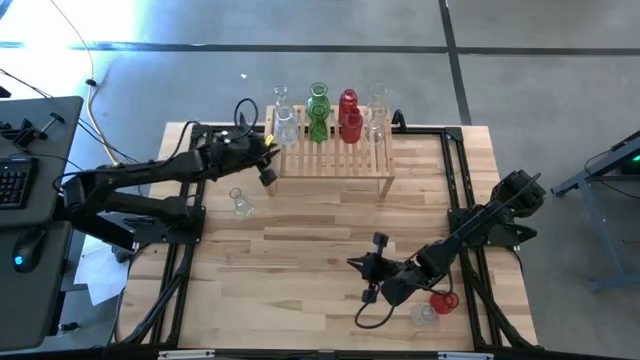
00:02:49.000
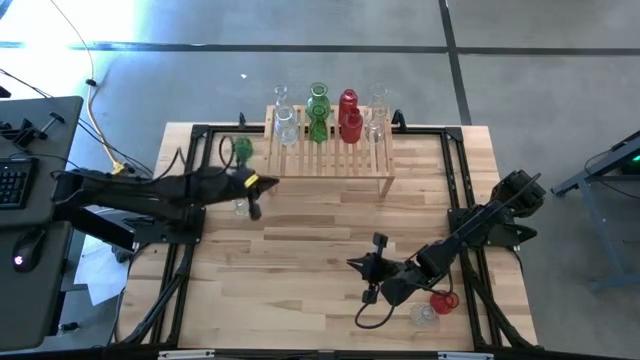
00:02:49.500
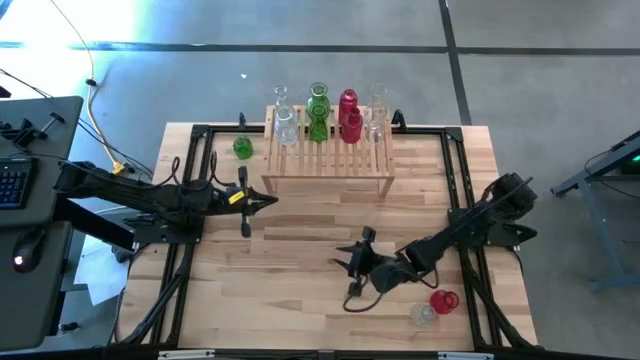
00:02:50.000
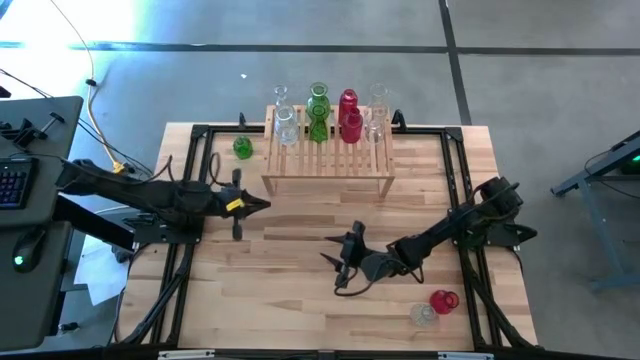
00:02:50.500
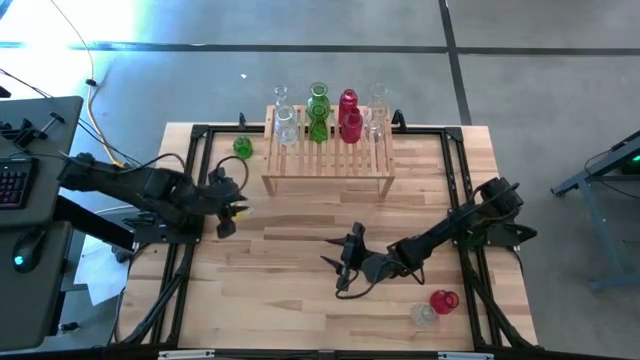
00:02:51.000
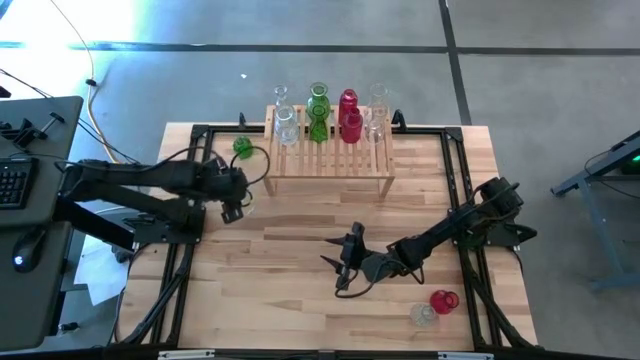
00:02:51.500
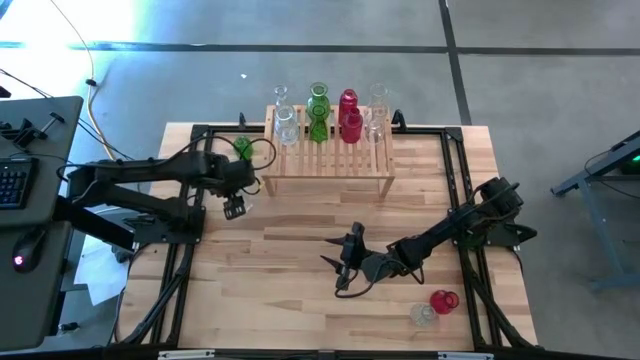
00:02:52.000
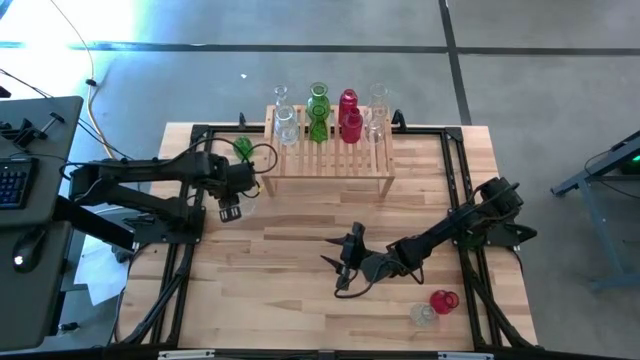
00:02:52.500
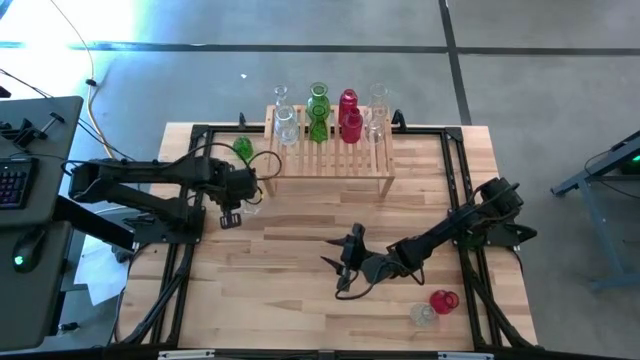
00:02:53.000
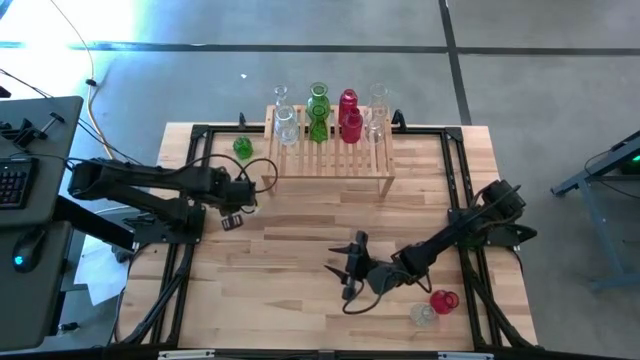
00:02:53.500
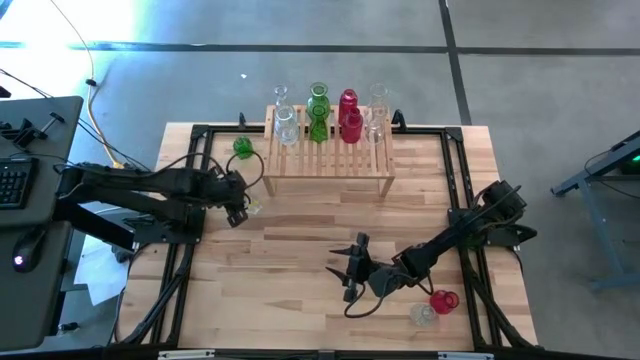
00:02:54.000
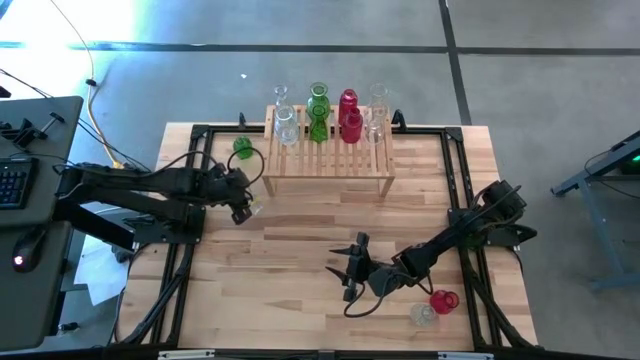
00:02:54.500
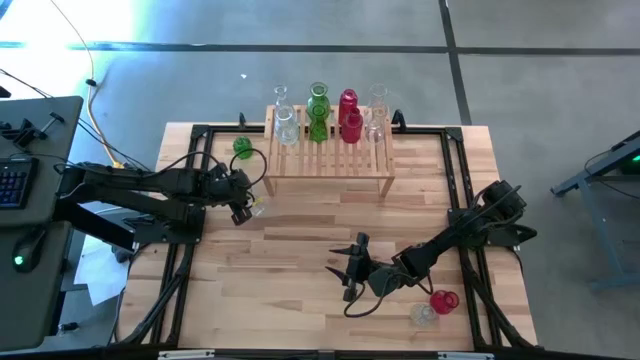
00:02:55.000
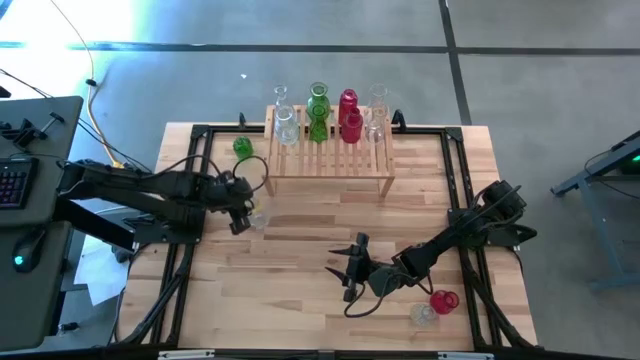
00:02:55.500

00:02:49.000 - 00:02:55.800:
Task: sort vases onto shelf
Put the transparent vase on the shelf aligned with the other transparent vases

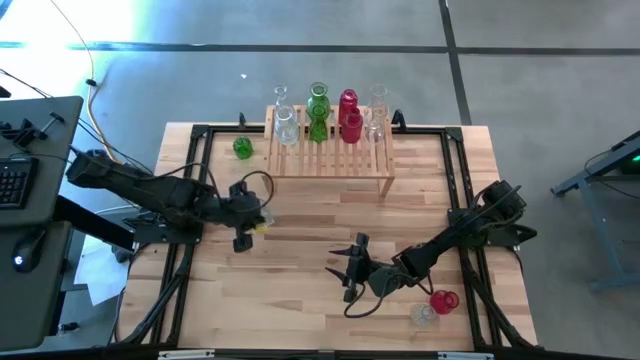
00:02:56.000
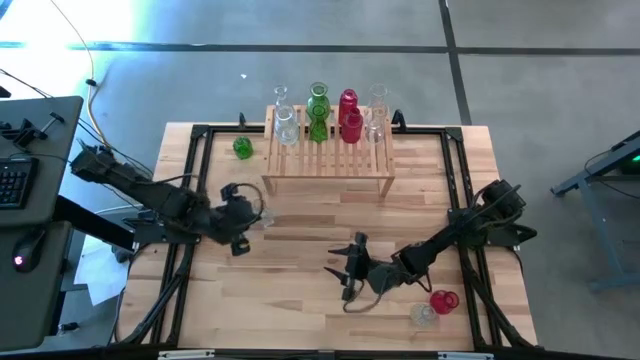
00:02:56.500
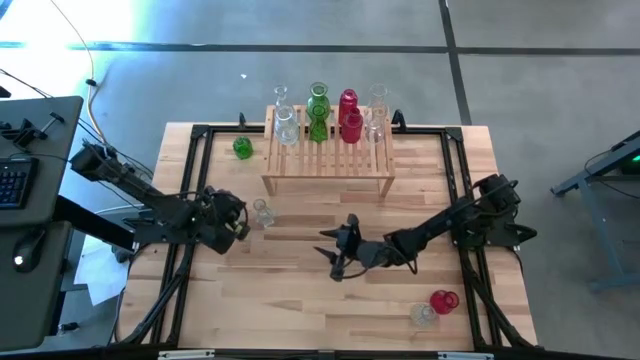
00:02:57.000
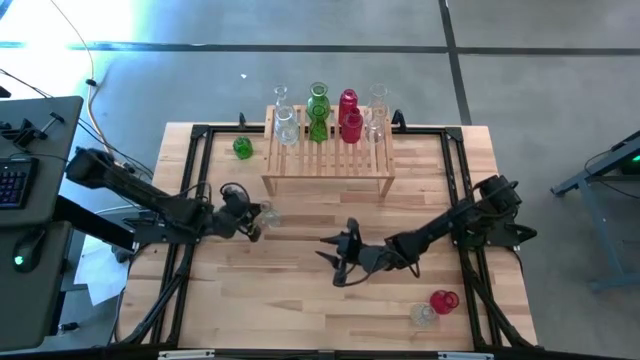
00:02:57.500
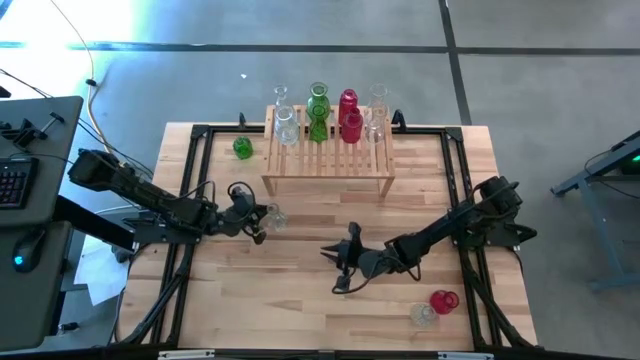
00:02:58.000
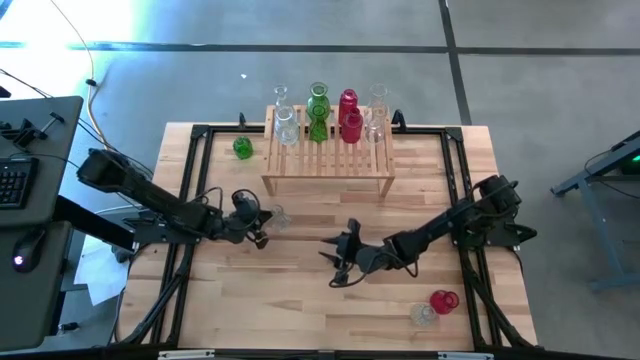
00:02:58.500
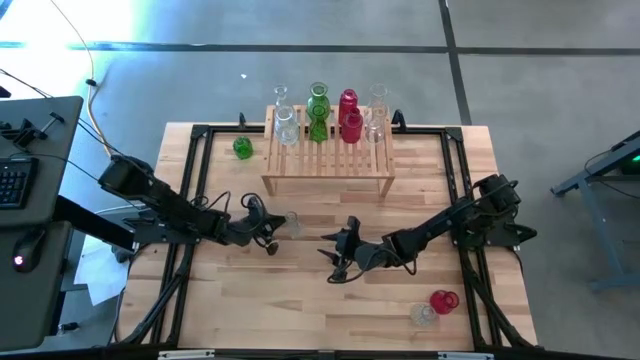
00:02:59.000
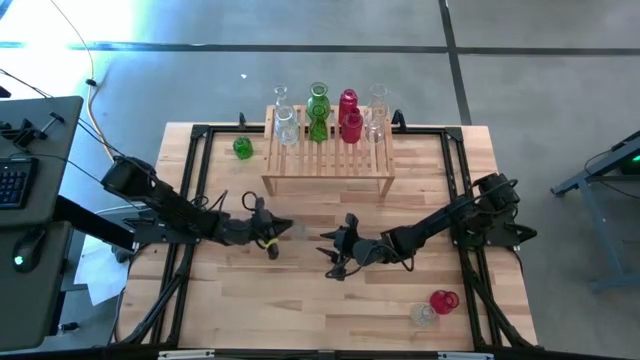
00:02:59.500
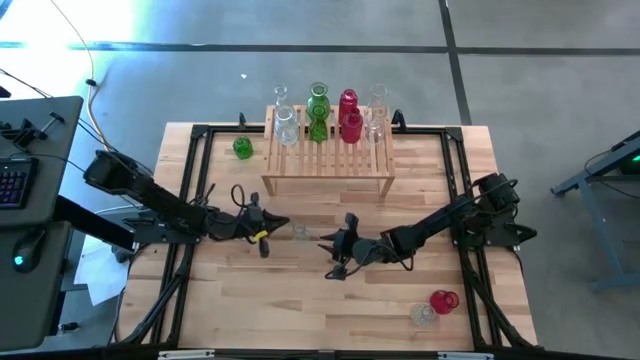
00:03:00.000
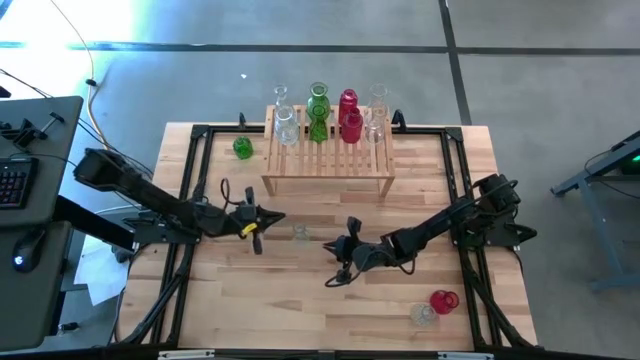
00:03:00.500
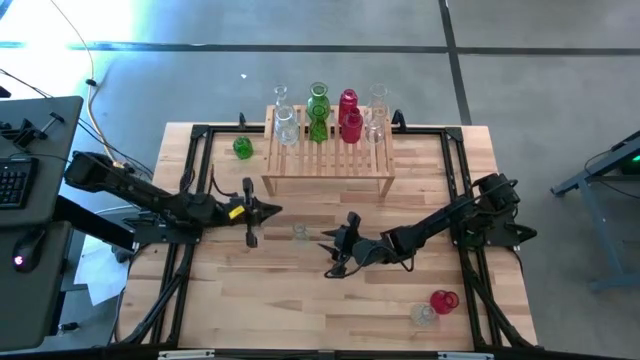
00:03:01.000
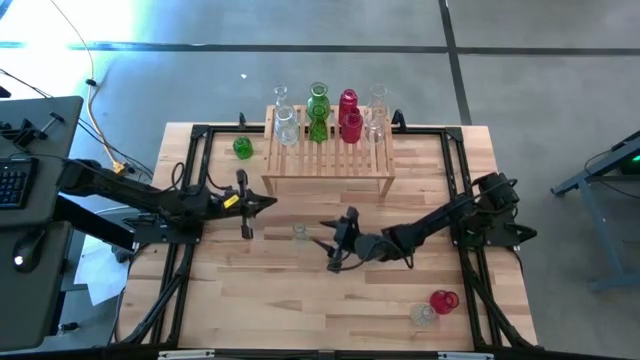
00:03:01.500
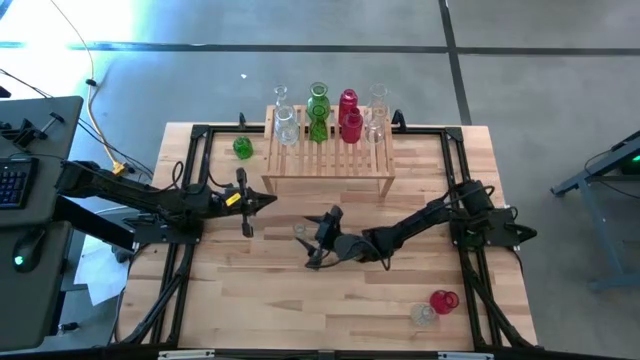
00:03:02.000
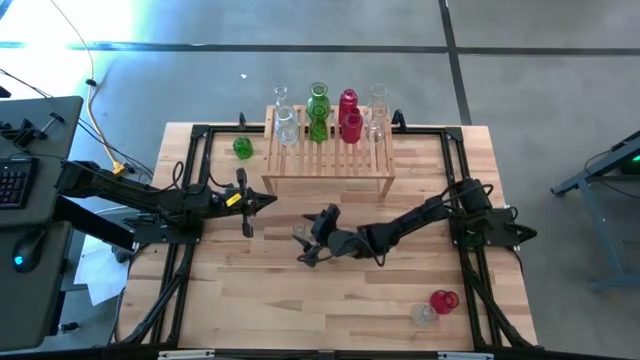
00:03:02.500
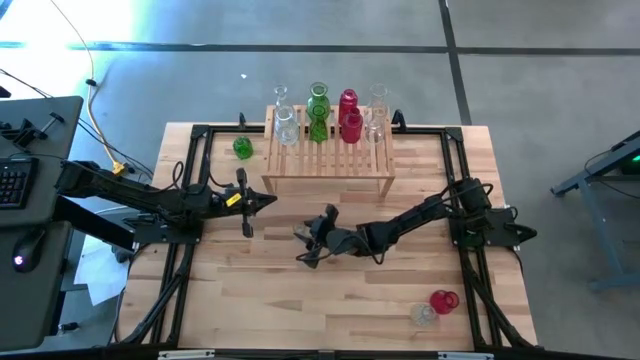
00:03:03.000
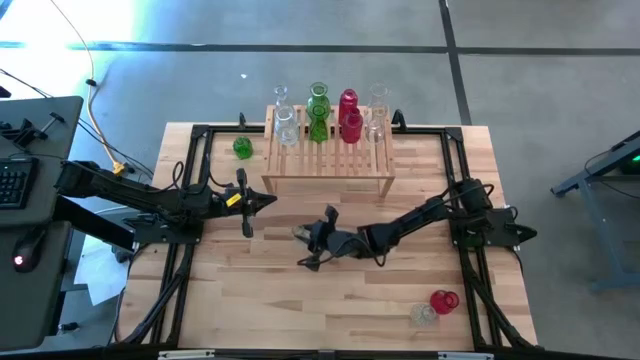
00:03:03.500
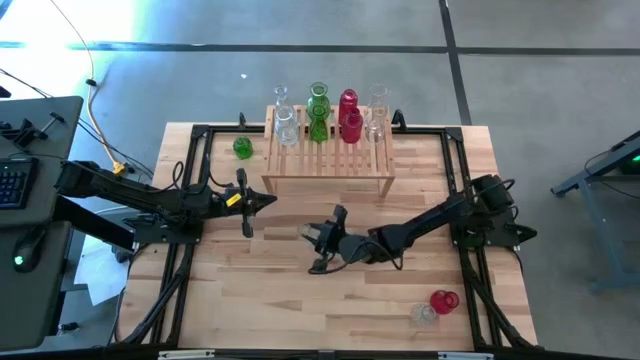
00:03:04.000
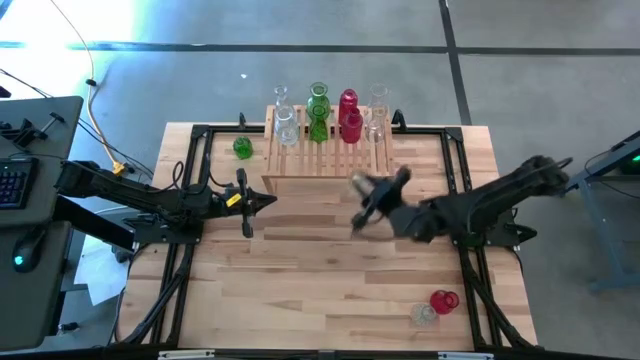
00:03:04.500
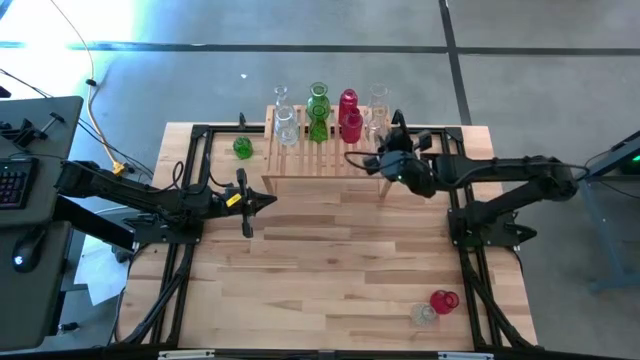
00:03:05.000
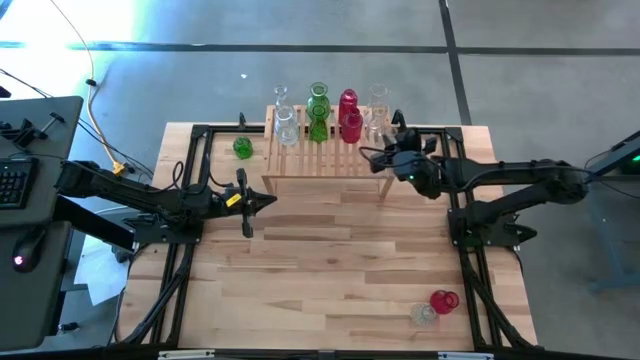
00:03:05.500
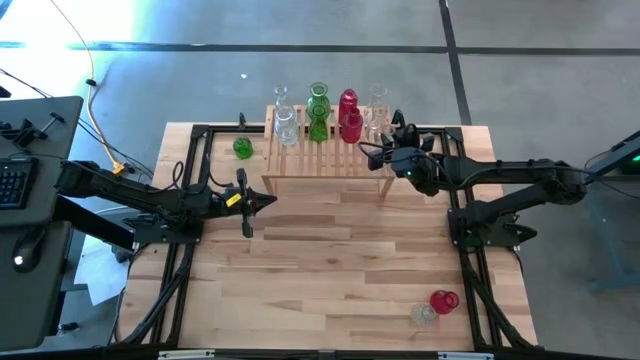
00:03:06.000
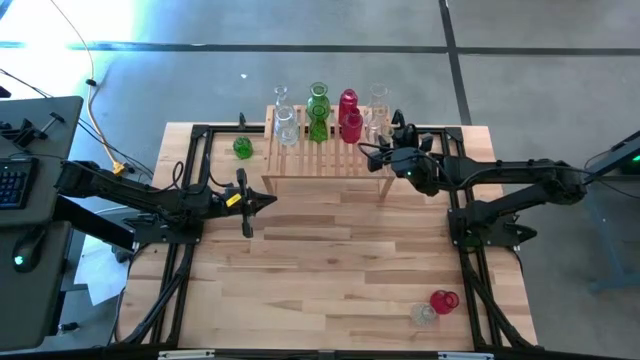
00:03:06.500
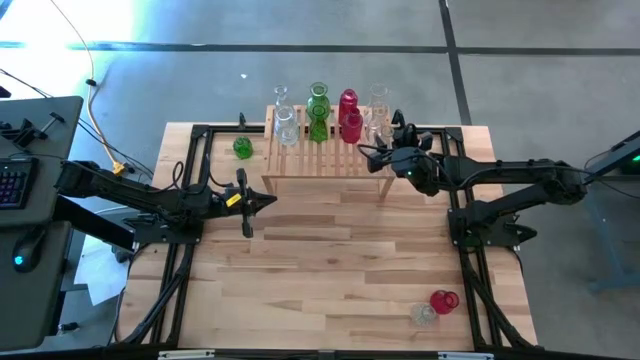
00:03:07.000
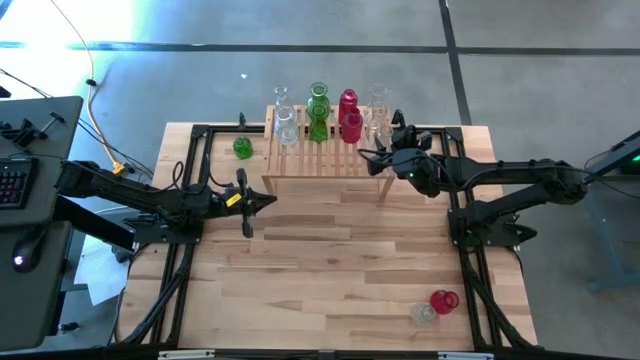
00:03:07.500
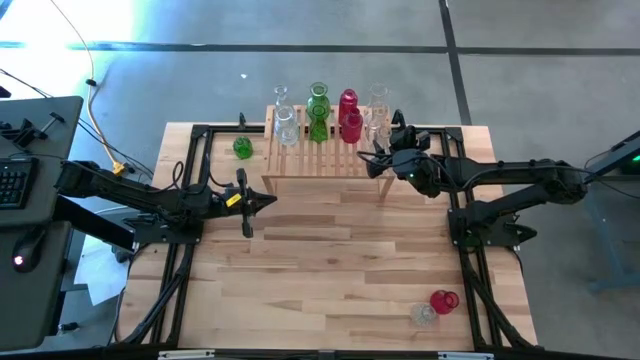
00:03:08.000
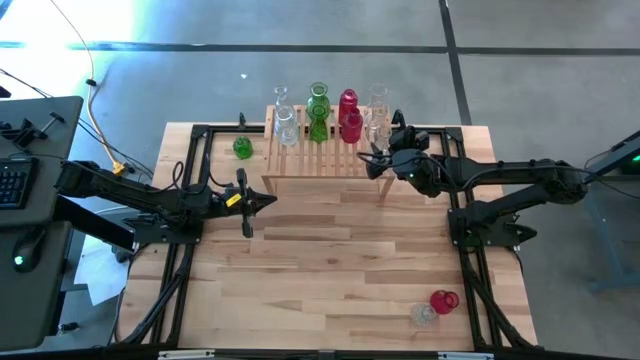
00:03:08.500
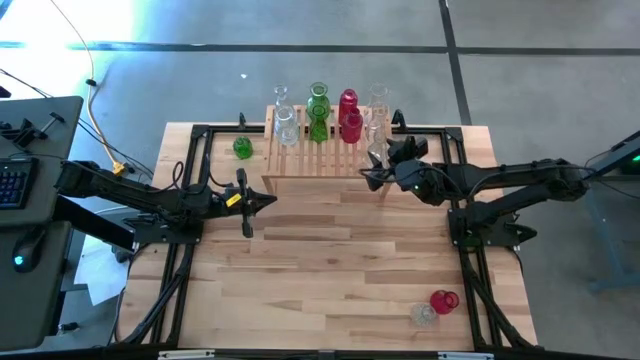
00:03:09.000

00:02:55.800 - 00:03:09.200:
Put the transparent vase on the shelf aligned with the other transparent vases

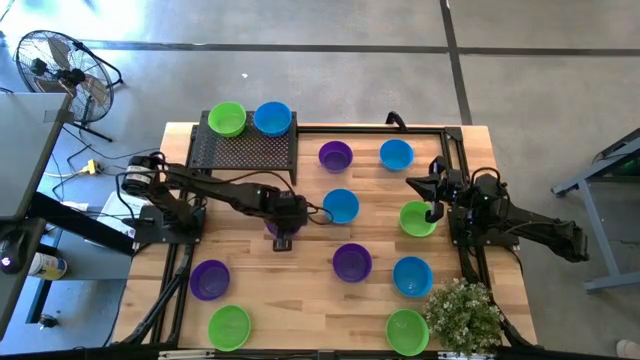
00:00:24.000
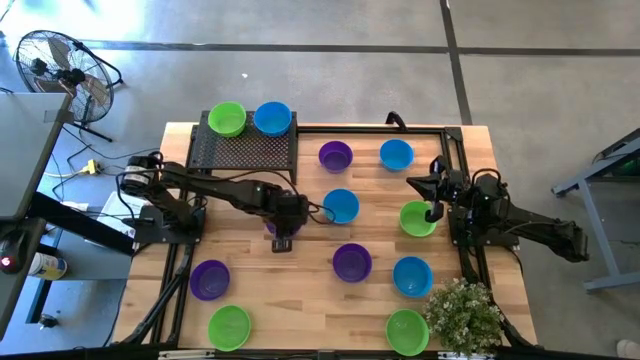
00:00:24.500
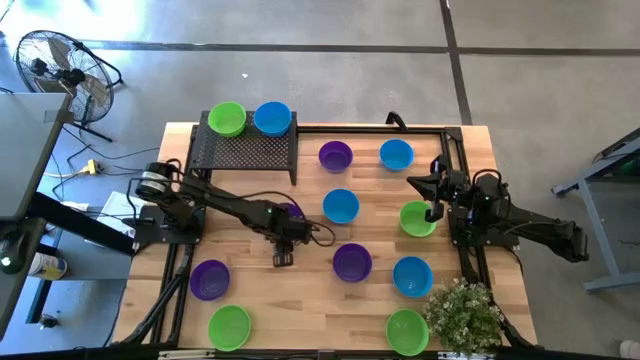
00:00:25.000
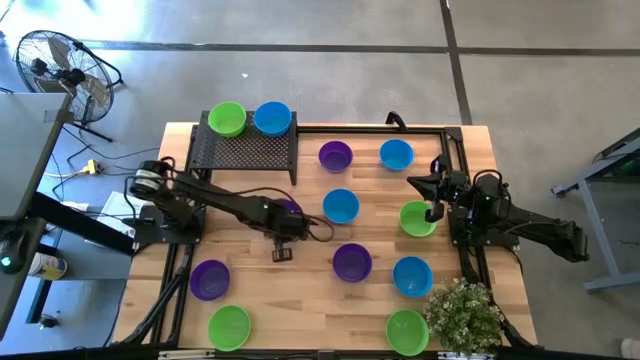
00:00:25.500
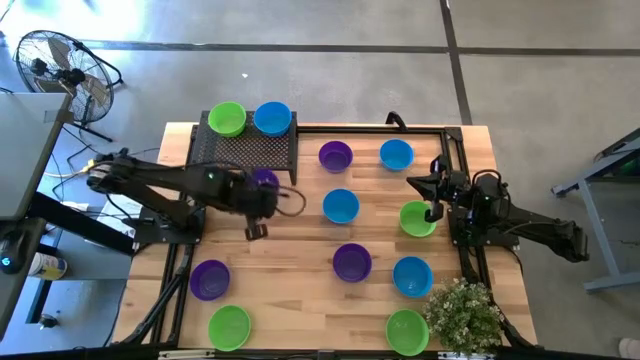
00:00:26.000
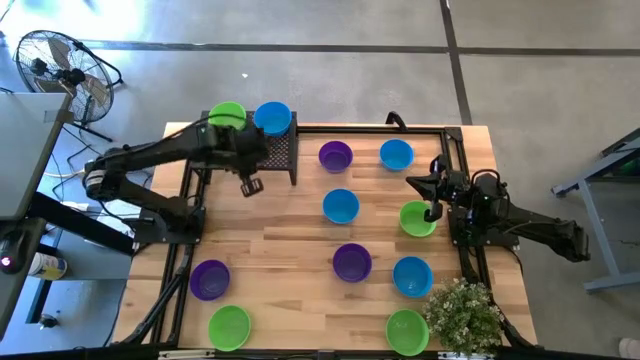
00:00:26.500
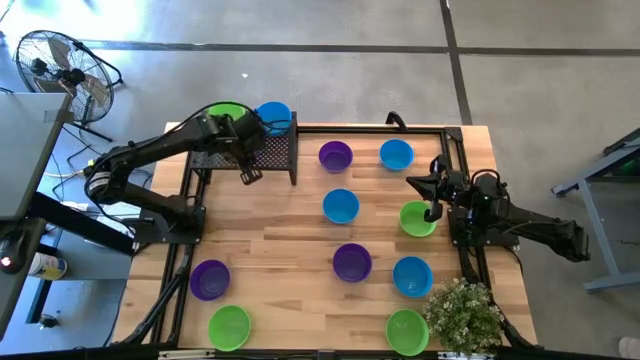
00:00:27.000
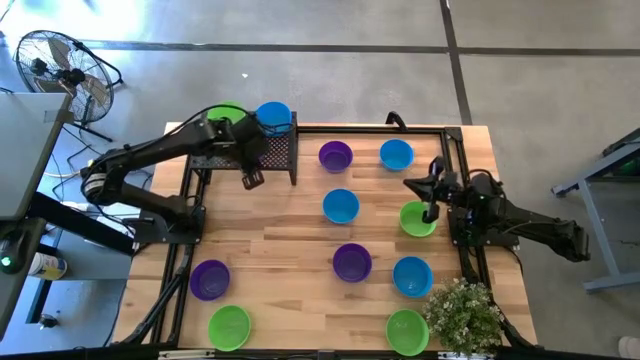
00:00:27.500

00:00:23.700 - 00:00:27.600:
Task: Pick & Place Mini bowls
Put the violet bowl on the shelf
